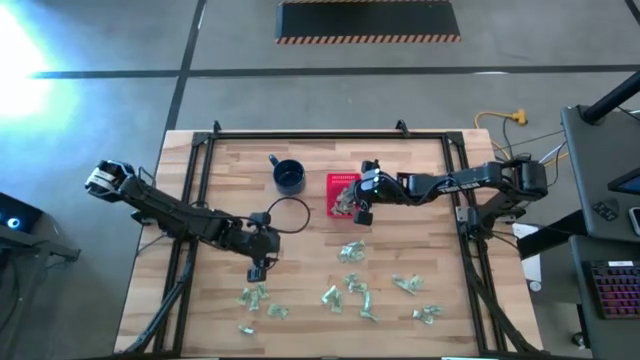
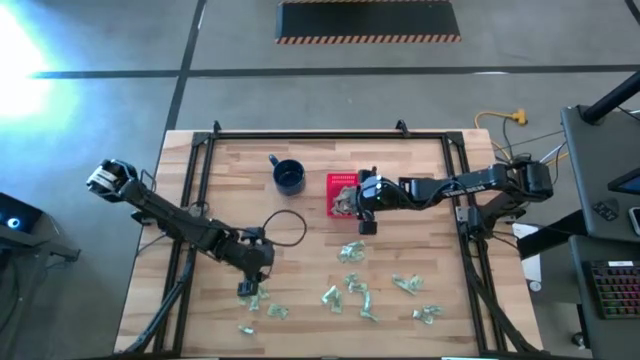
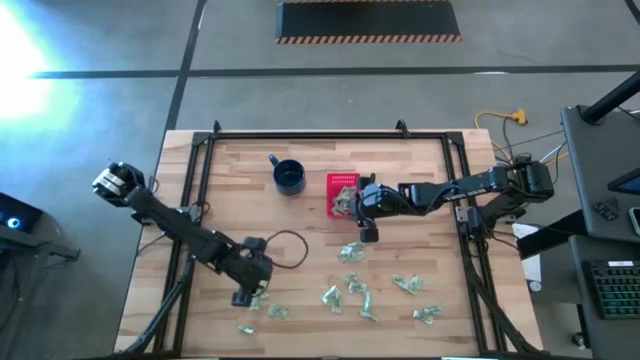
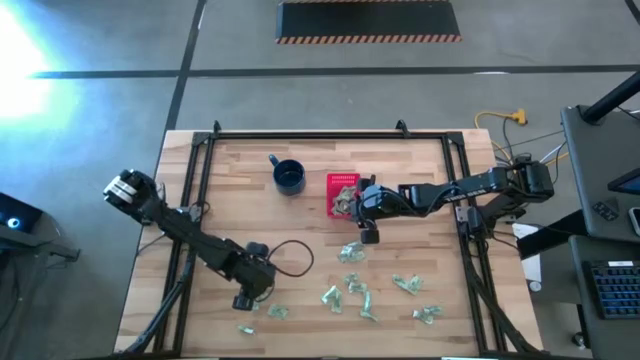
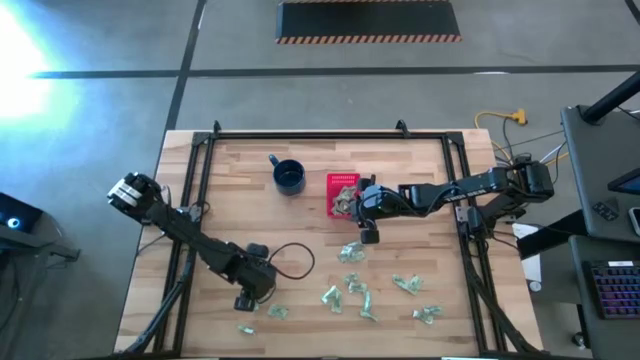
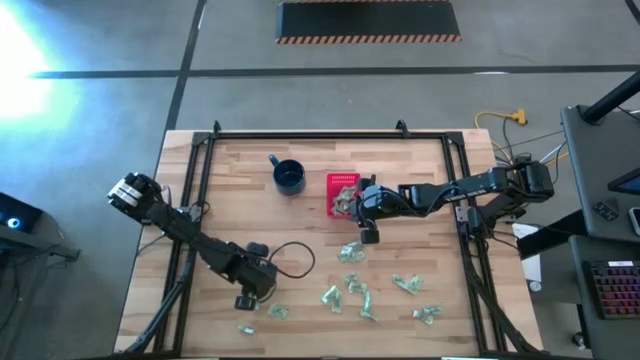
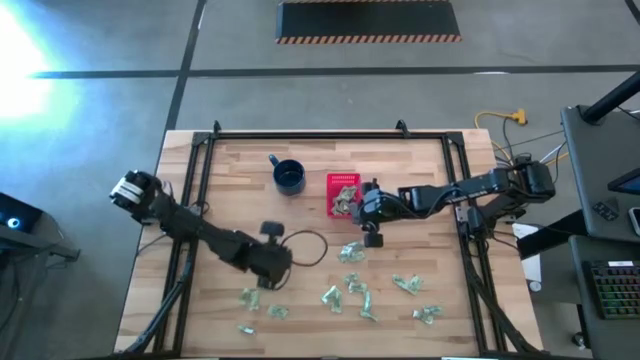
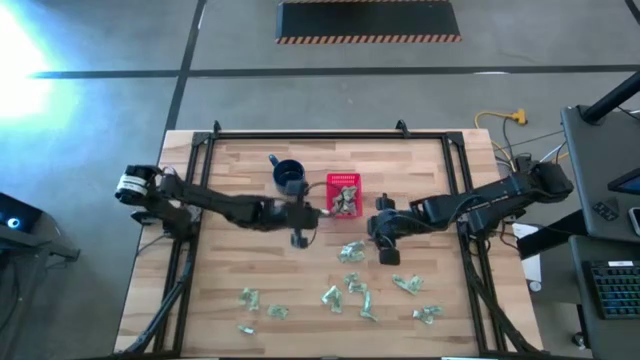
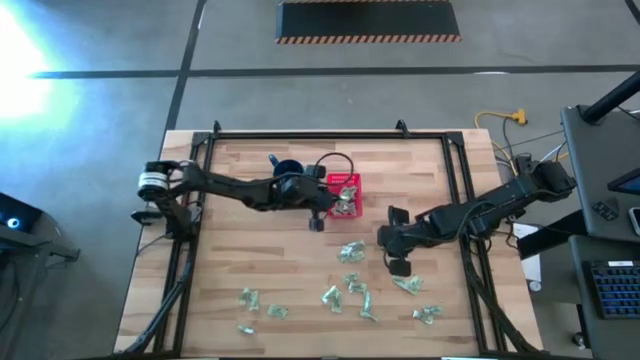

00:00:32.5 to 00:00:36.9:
Task: Pick and place items into bin
Put the green stevia packet into the red bin

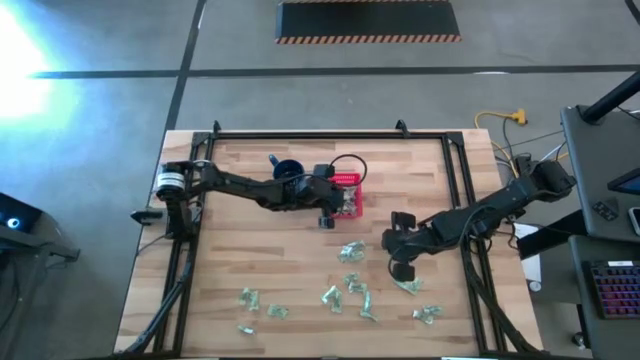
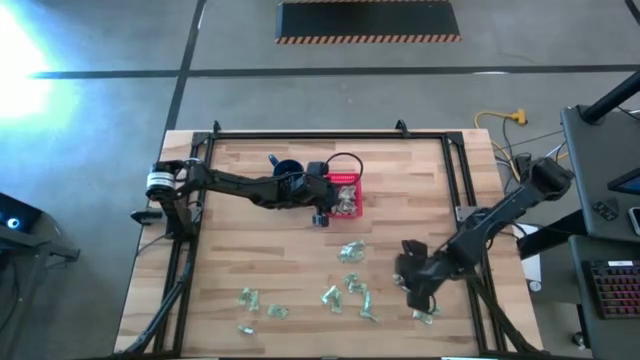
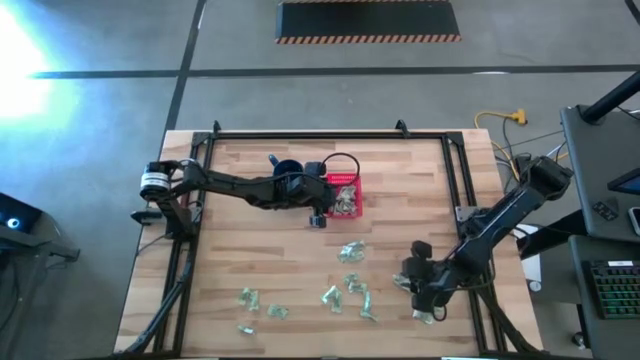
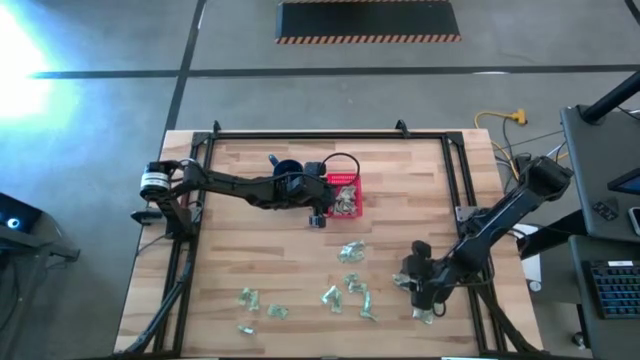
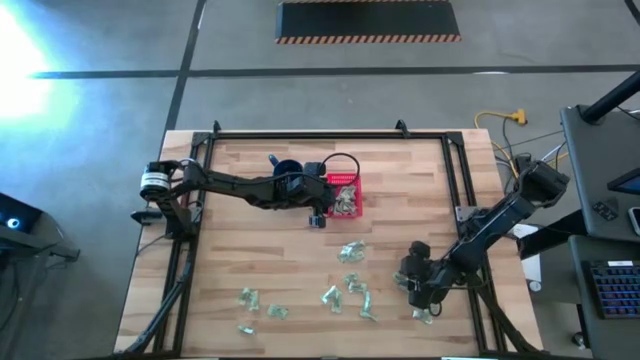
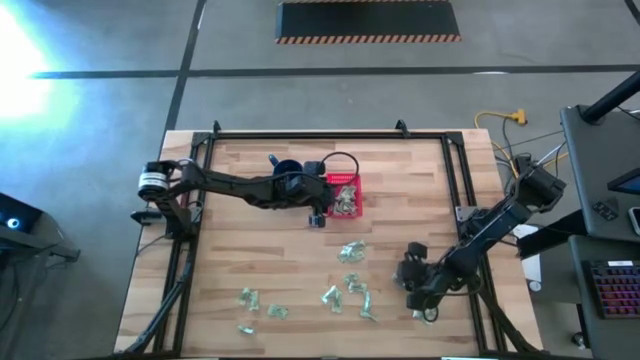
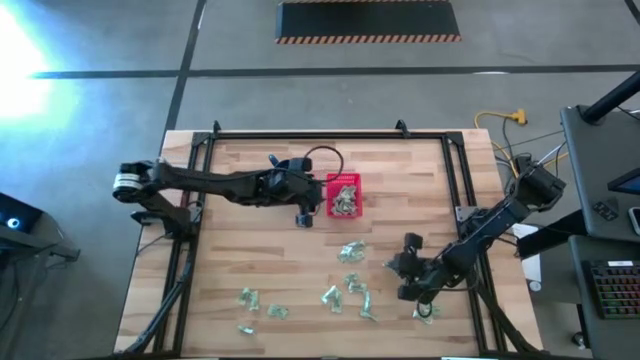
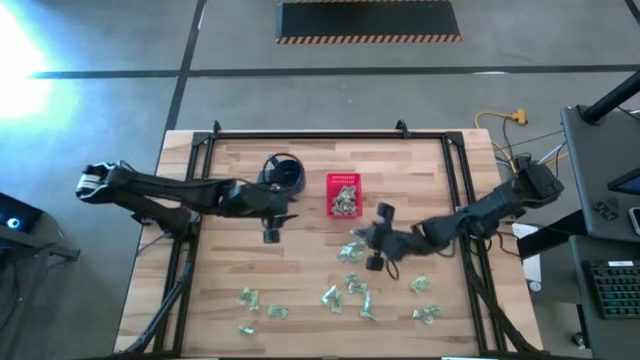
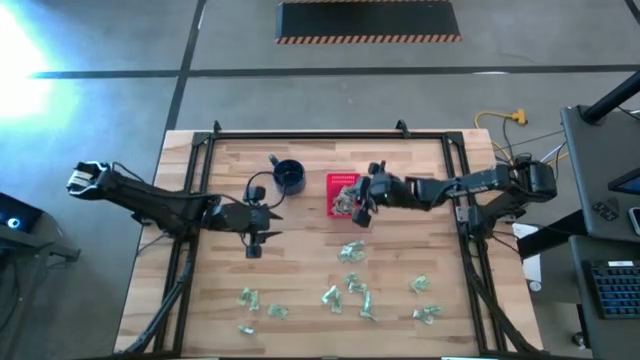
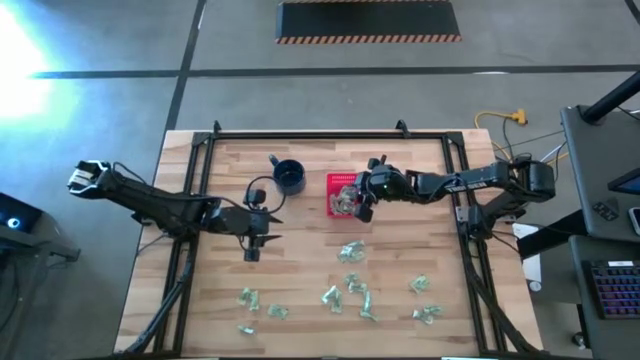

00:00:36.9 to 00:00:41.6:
Put the green stevia packet into the red bin

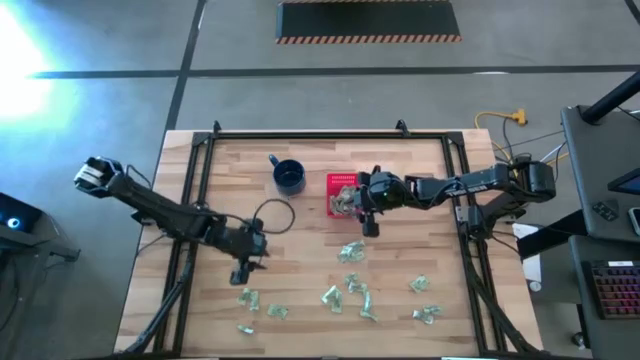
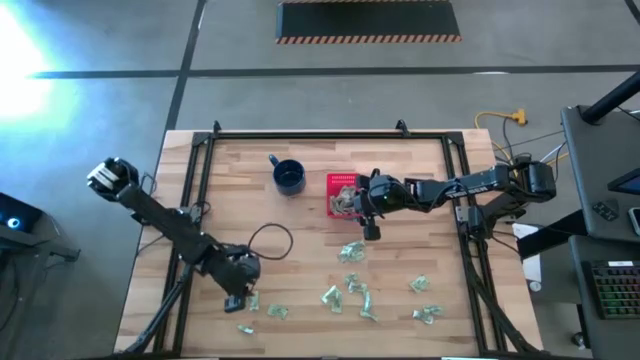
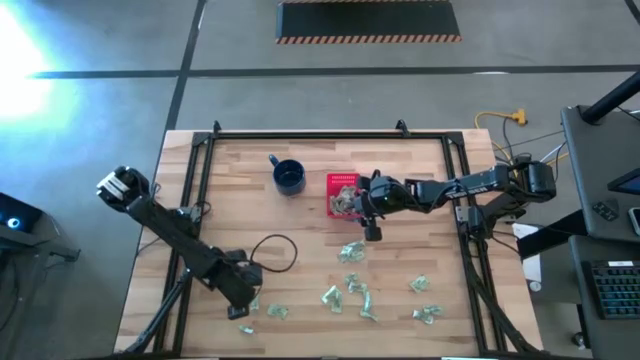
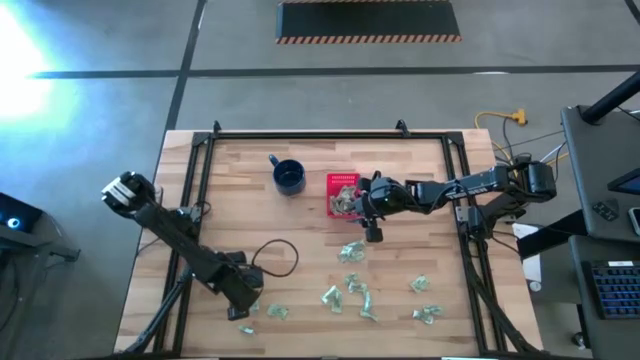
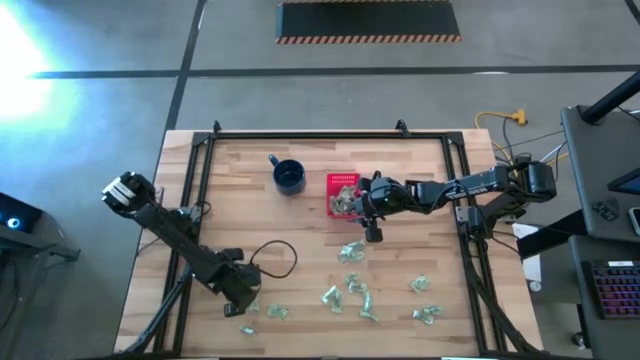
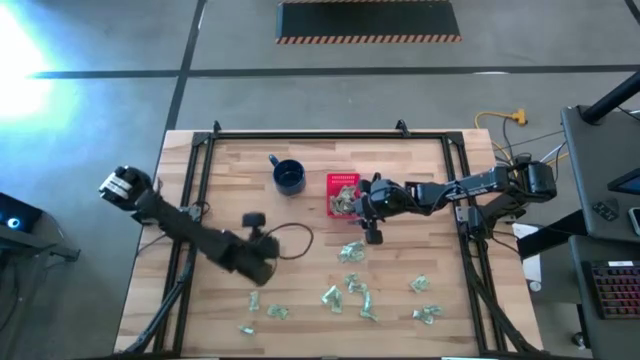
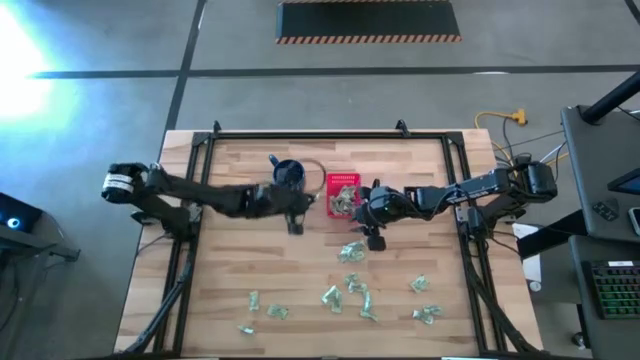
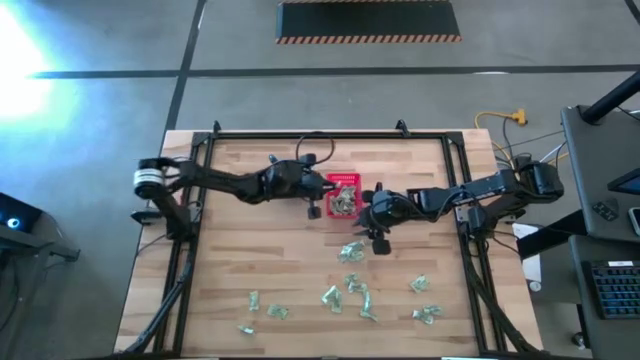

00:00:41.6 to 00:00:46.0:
Put the green stevia packet into the red bin

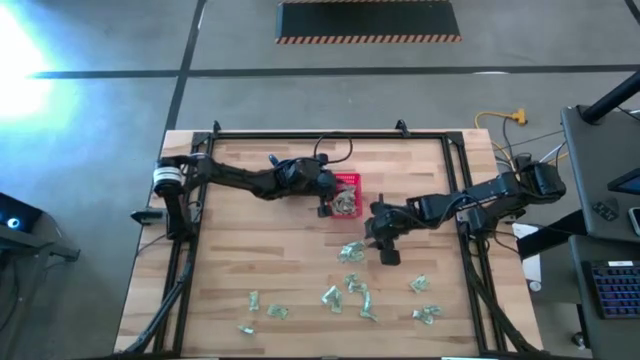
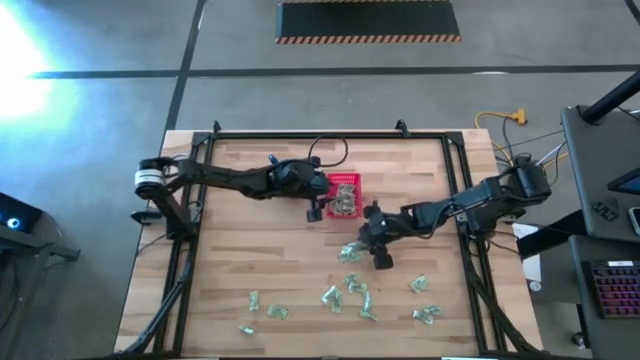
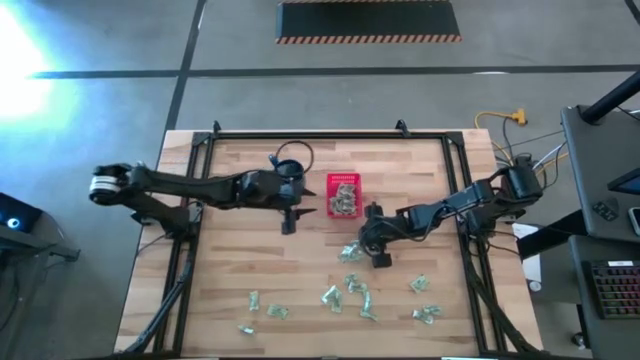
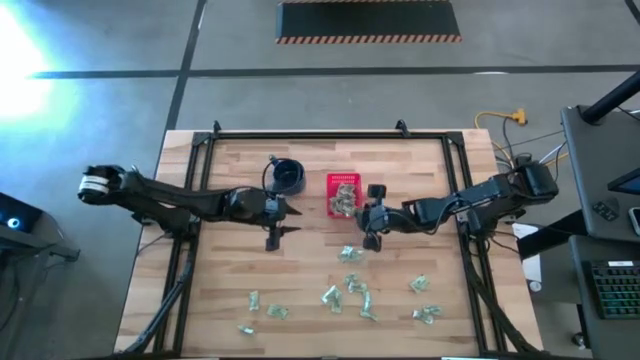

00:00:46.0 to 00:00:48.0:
Put the green stevia packet into the red bin

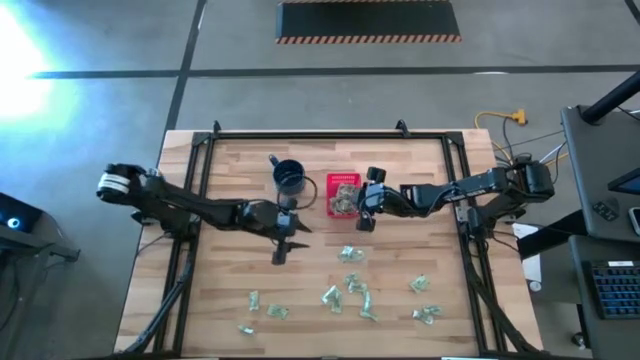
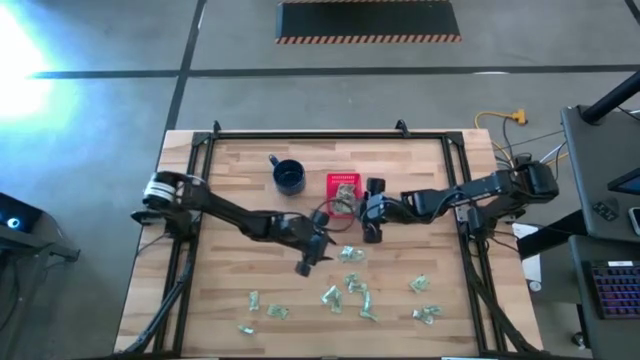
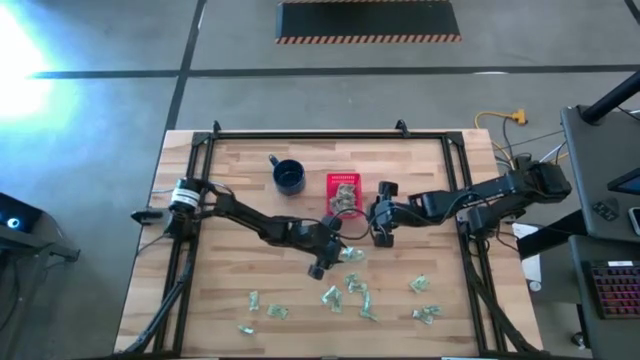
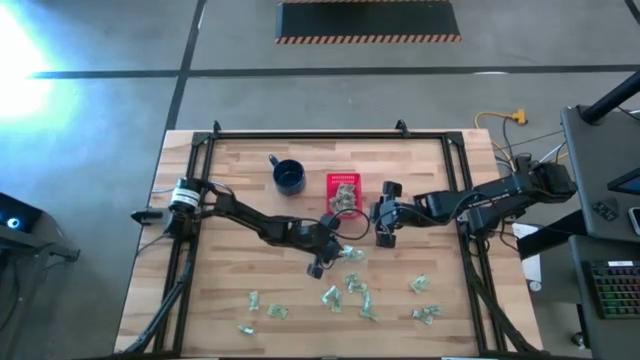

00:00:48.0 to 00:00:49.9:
Put the green stevia packet into the red bin

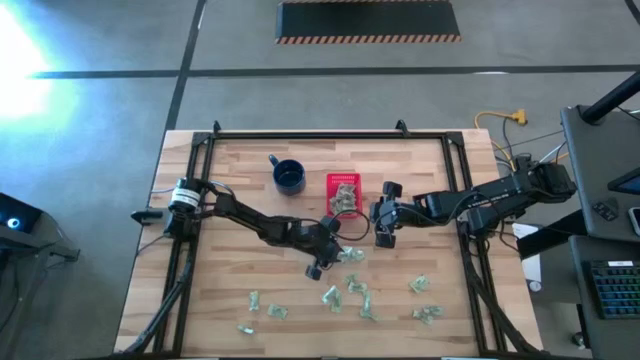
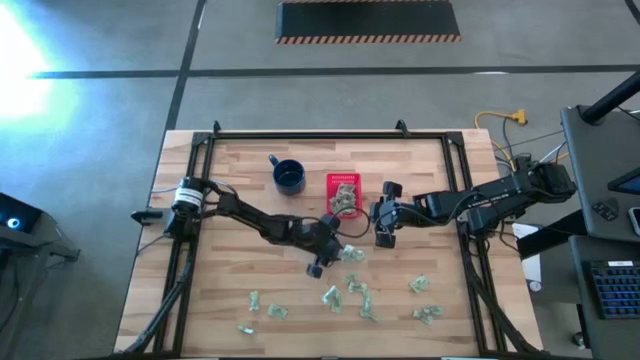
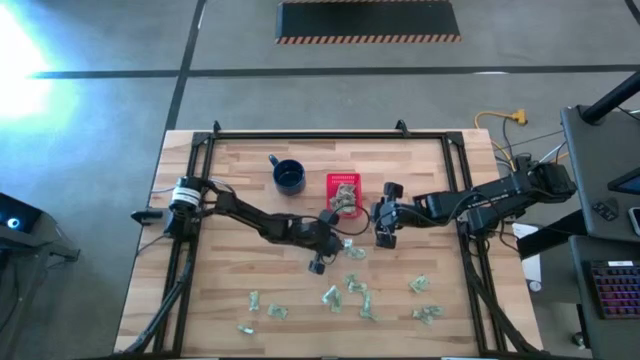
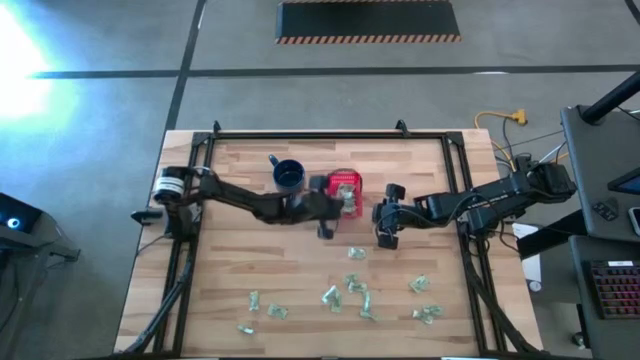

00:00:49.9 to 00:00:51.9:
Put the green stevia packet into the red bin

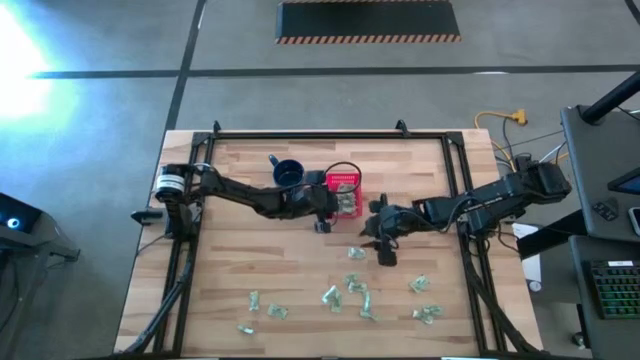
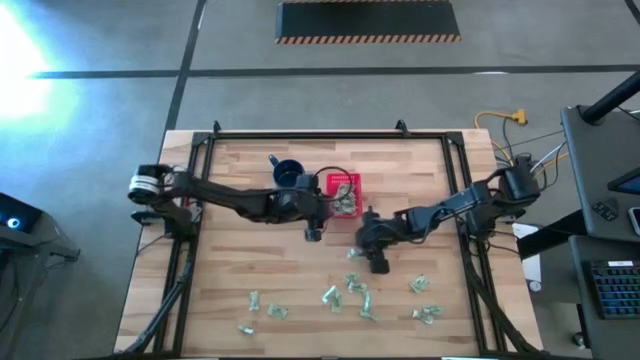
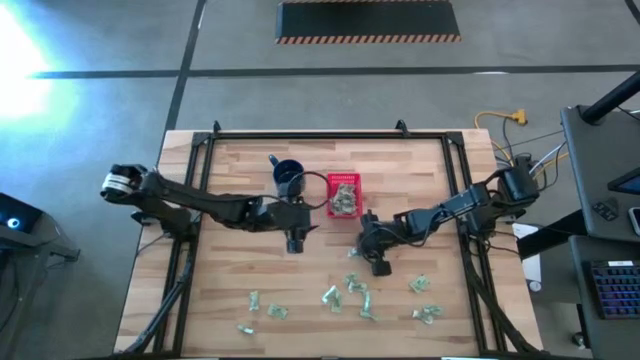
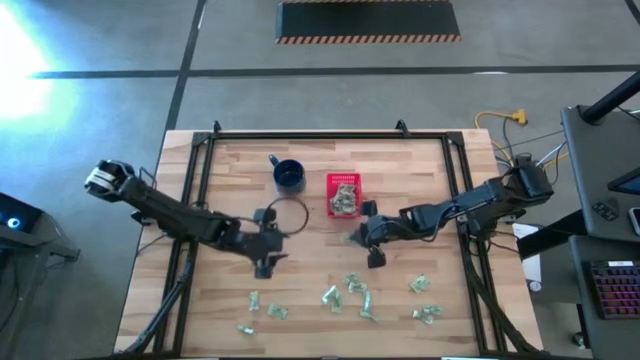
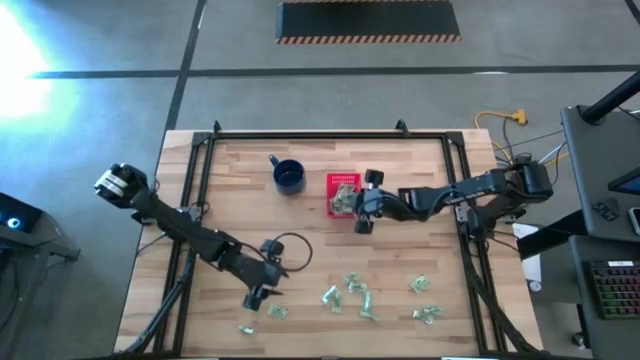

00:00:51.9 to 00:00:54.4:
Put the green stevia packet into the red bin

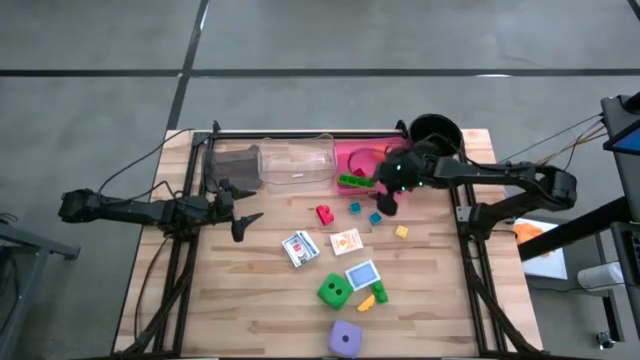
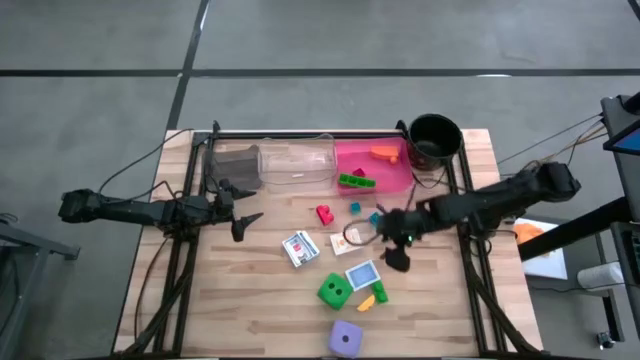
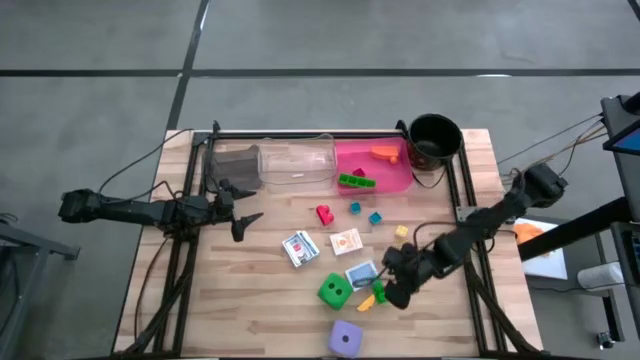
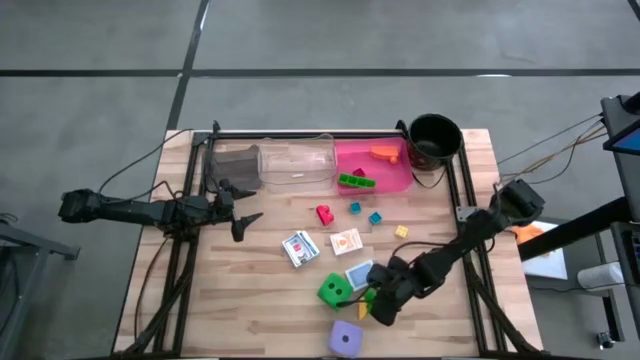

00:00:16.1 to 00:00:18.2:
Task: Pick & Place Toys
Put the green game piece into the pink bin
